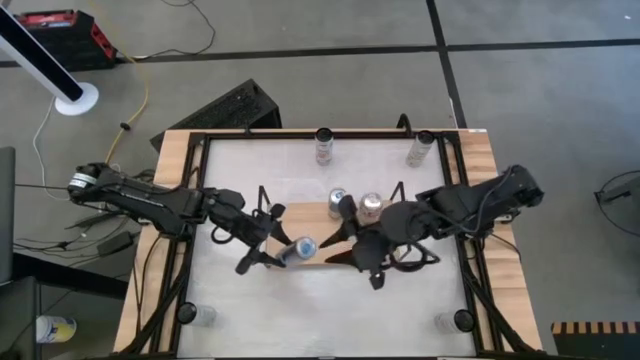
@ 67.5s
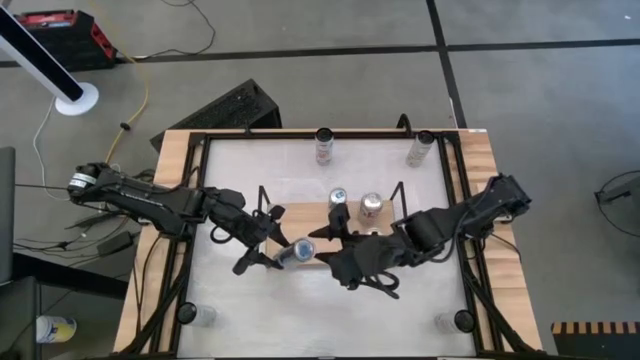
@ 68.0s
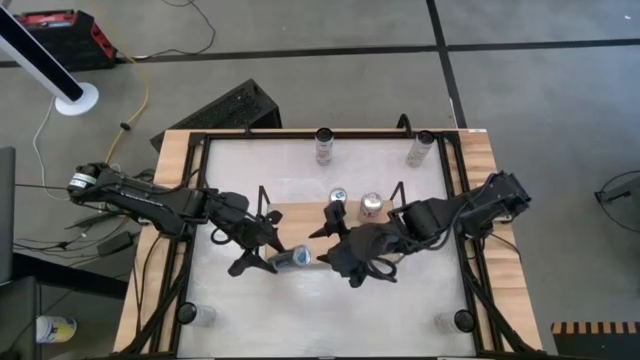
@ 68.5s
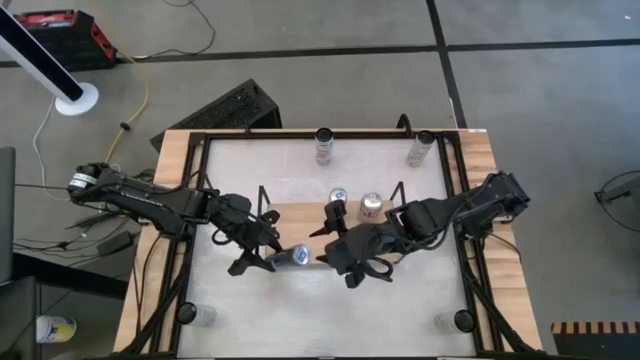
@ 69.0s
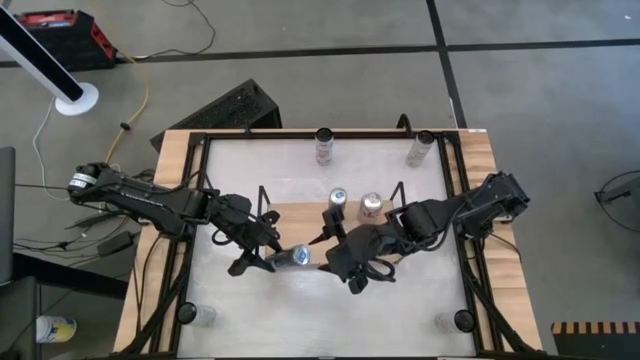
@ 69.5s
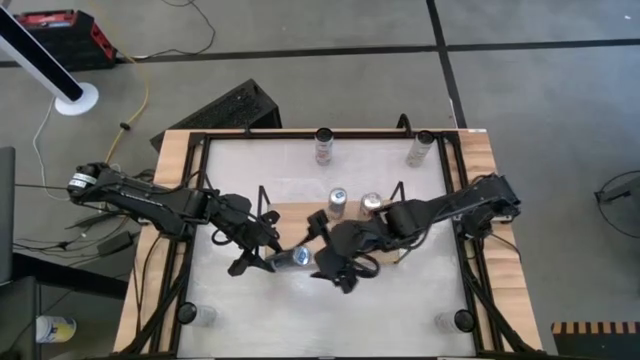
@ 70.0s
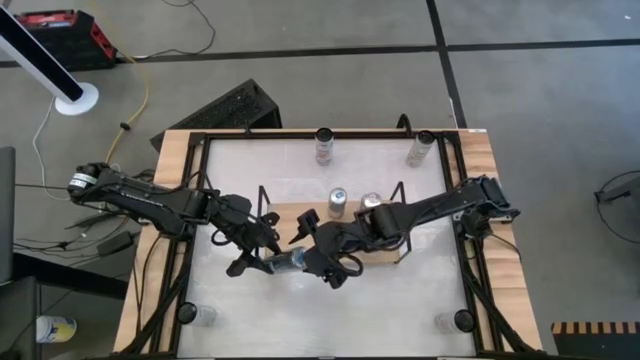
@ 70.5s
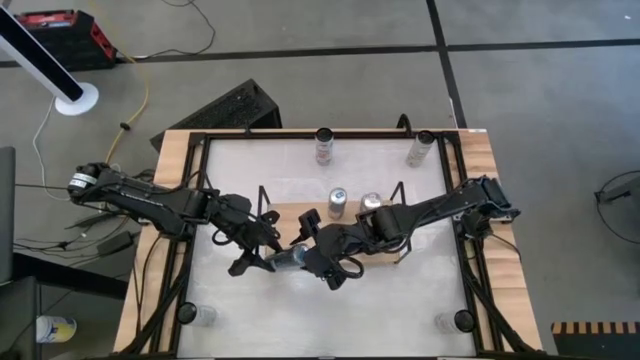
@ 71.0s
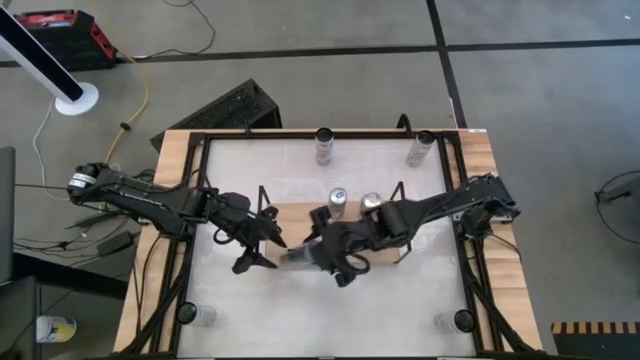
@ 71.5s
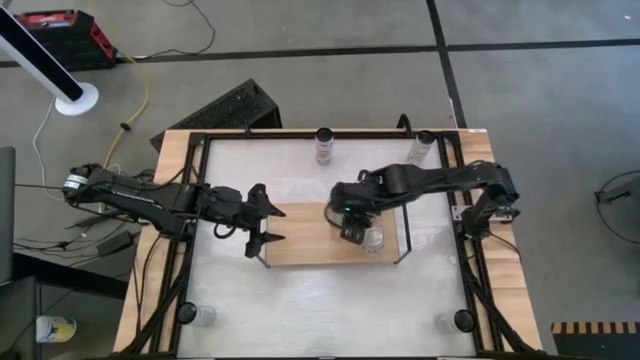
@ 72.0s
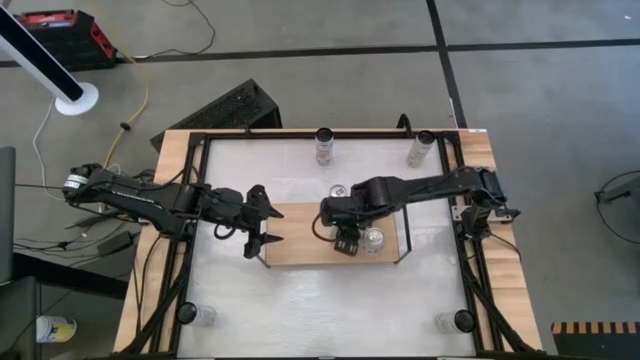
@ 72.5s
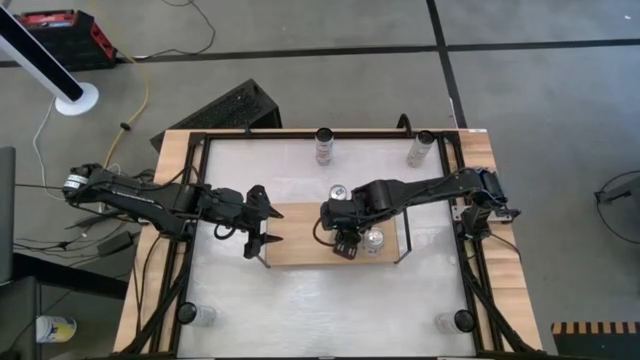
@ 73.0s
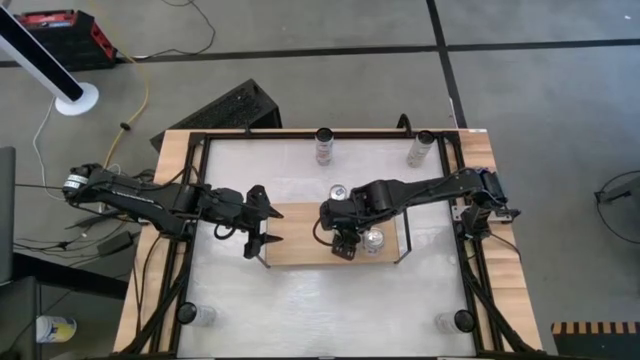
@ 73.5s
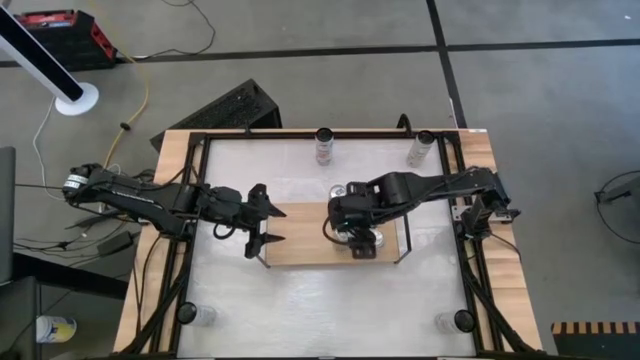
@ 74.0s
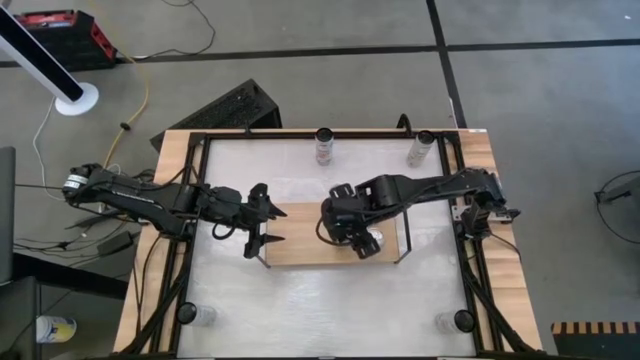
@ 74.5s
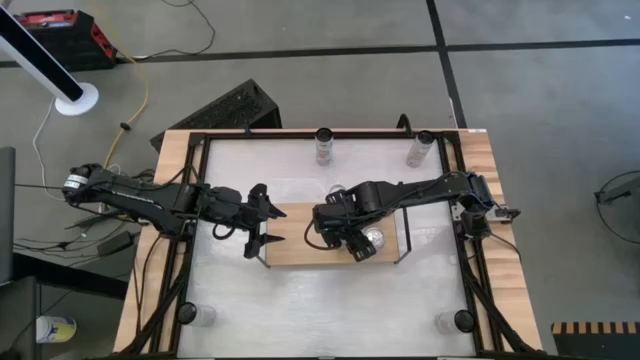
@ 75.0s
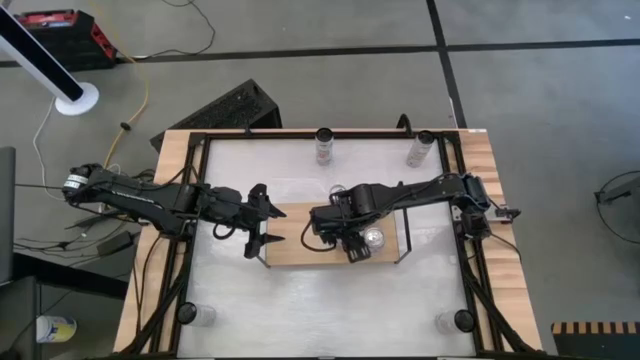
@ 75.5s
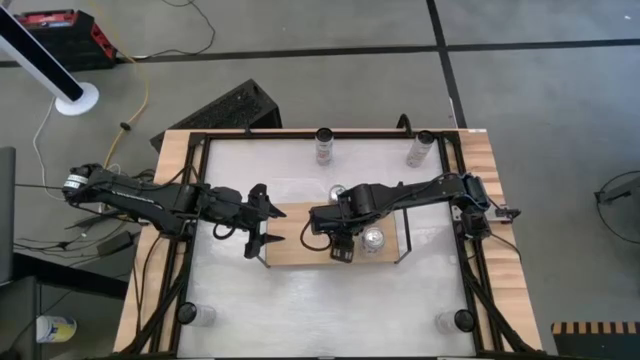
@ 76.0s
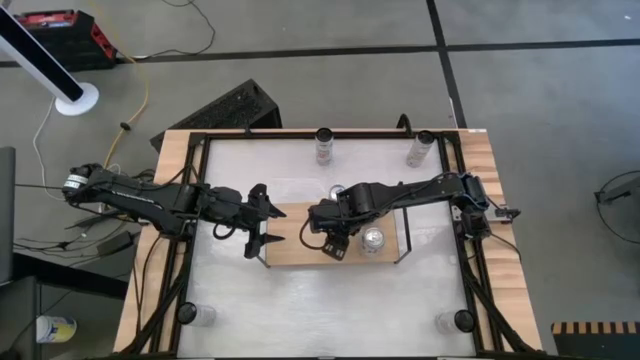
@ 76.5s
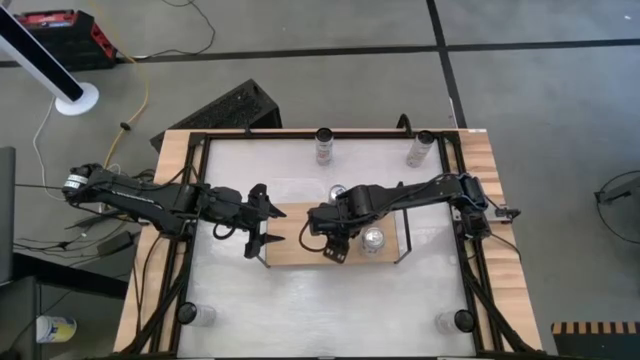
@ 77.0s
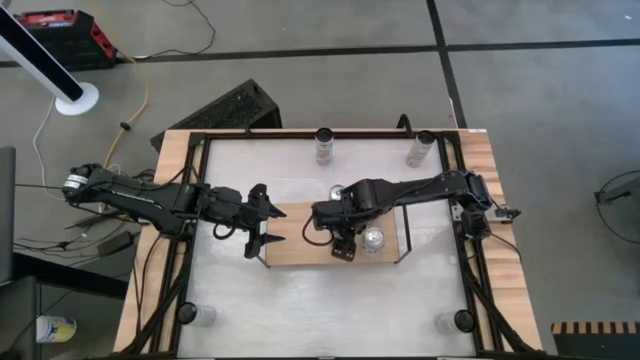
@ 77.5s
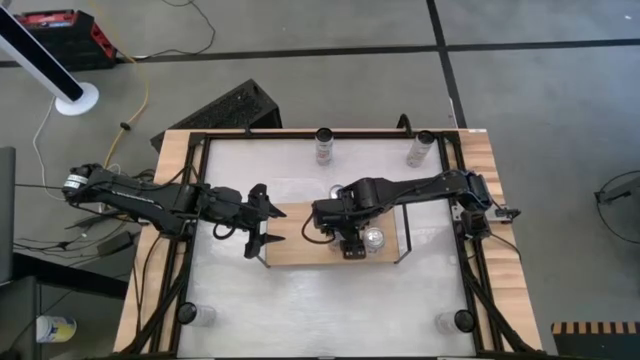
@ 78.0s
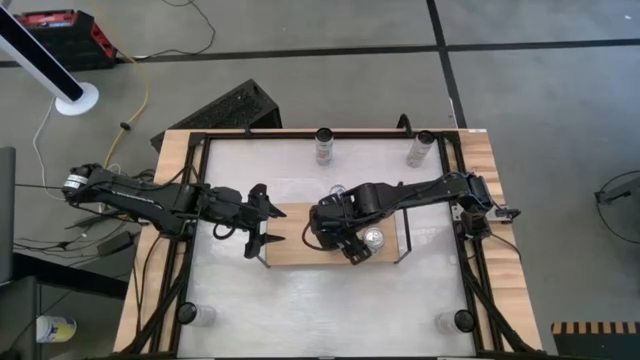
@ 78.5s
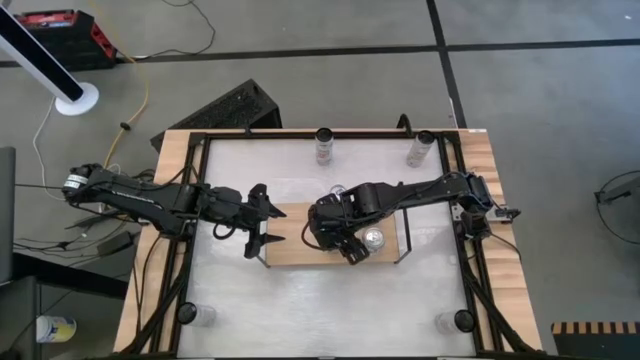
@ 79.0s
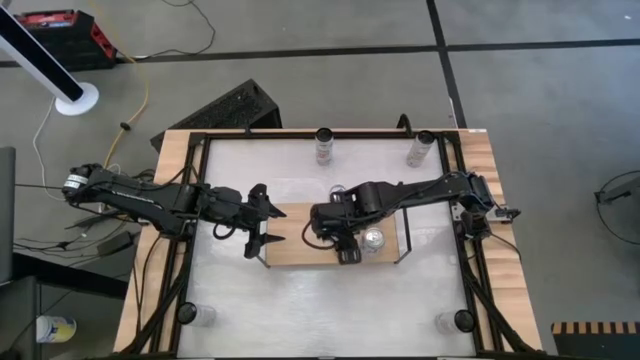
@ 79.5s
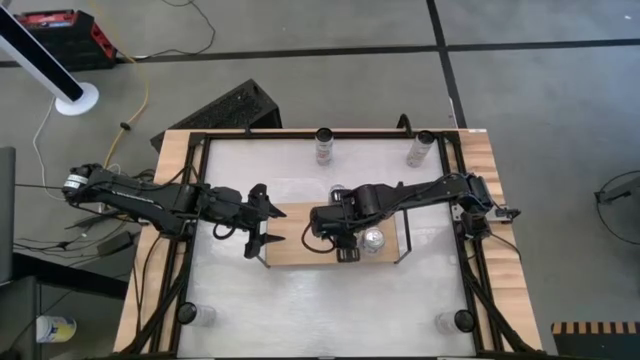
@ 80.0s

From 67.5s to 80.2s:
Task: Place canned beverage on shelf
Put the blue soda can on the shelf aligned with the other blue soda can

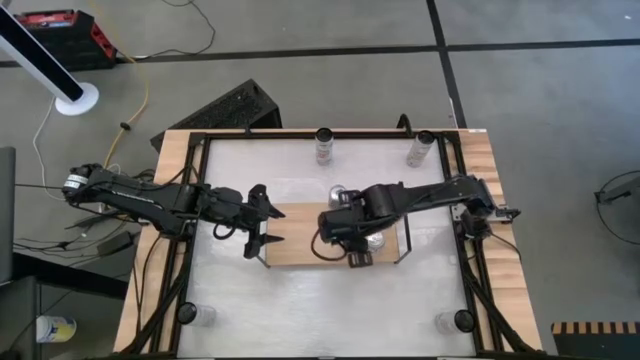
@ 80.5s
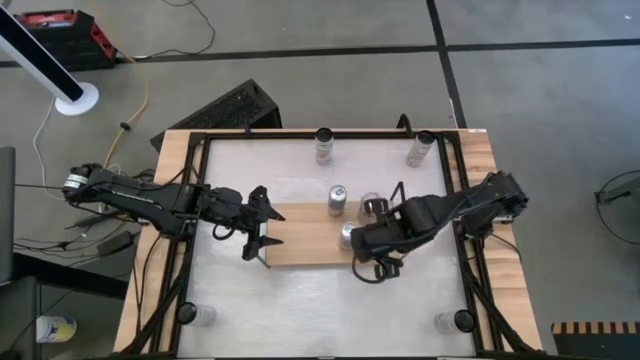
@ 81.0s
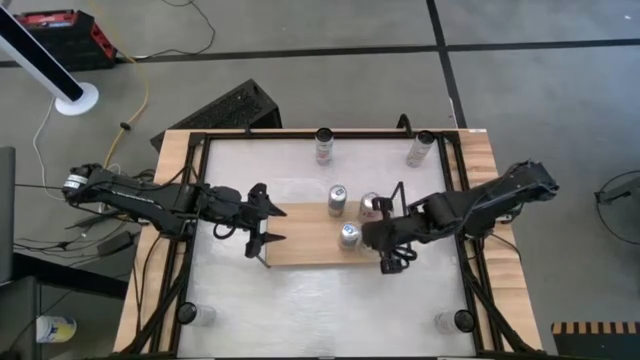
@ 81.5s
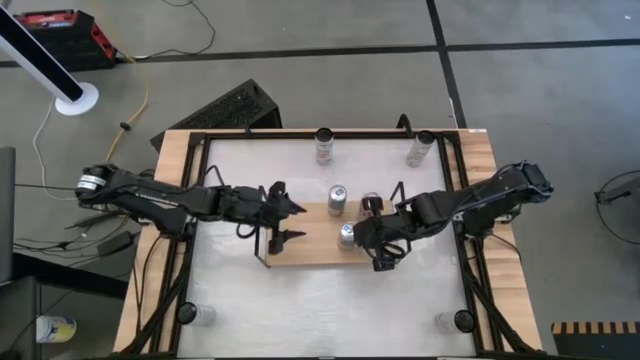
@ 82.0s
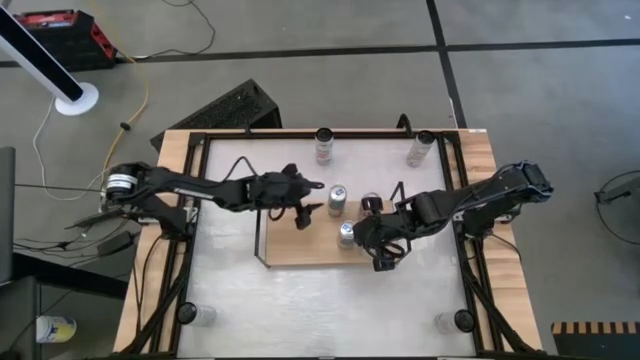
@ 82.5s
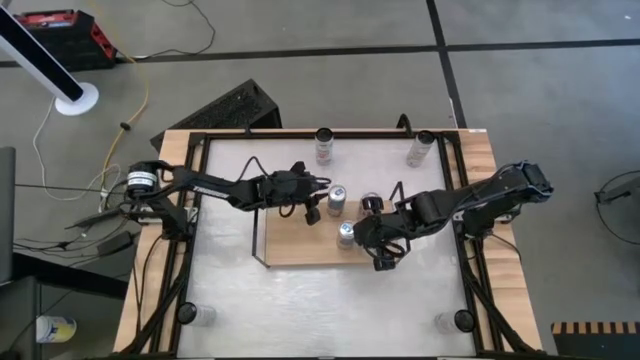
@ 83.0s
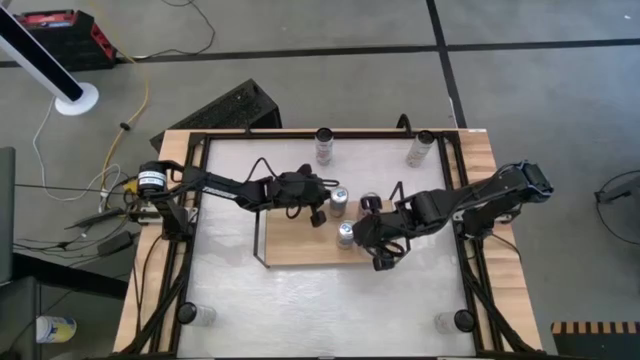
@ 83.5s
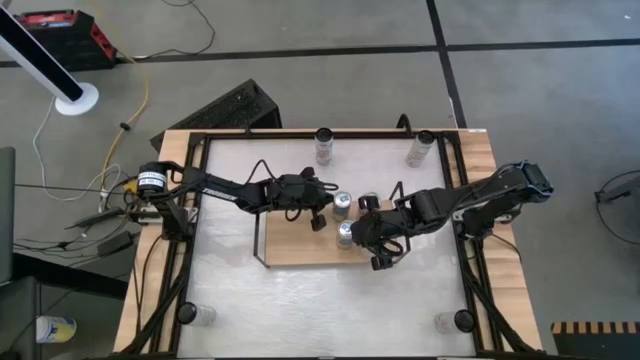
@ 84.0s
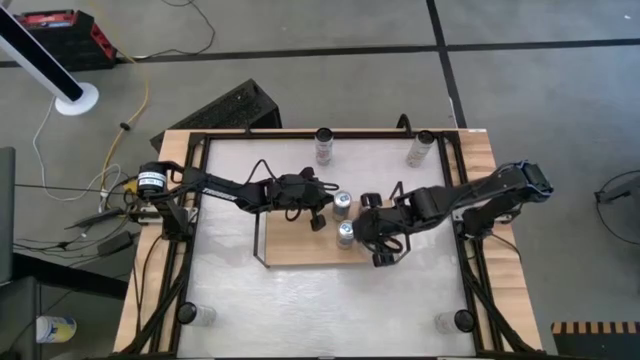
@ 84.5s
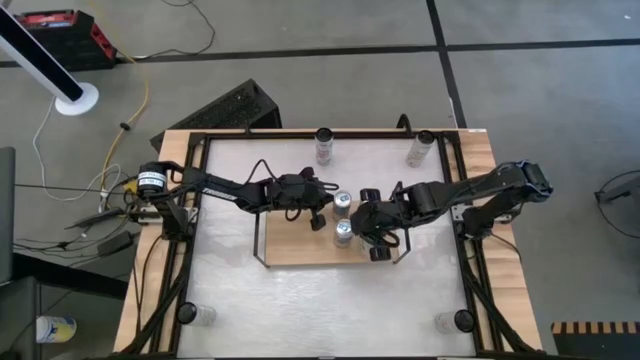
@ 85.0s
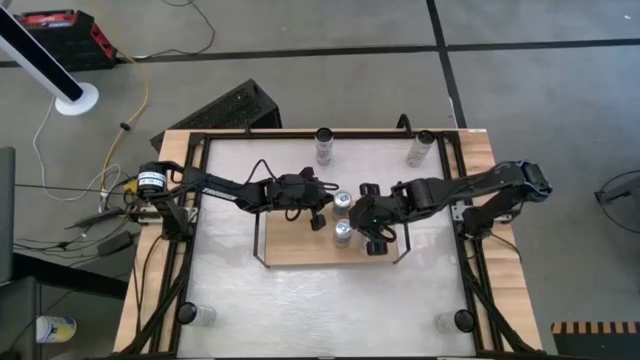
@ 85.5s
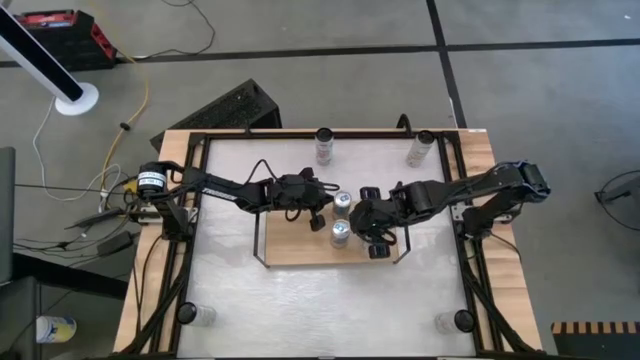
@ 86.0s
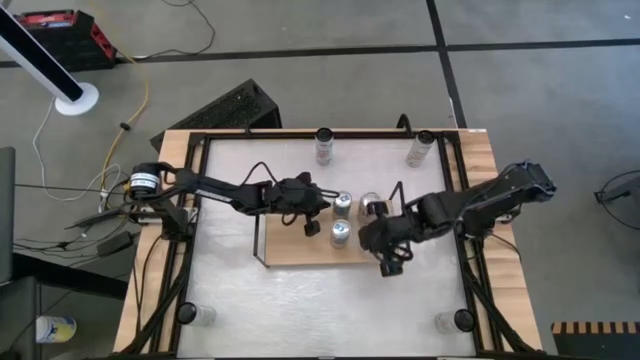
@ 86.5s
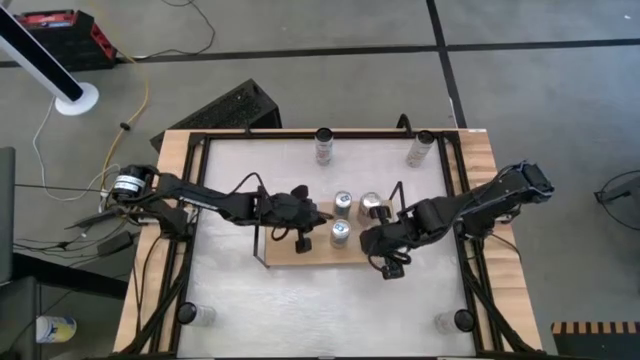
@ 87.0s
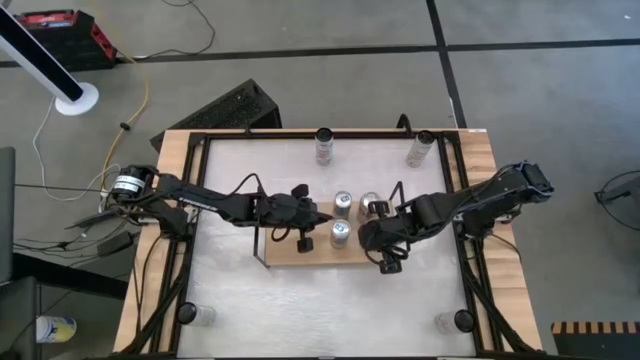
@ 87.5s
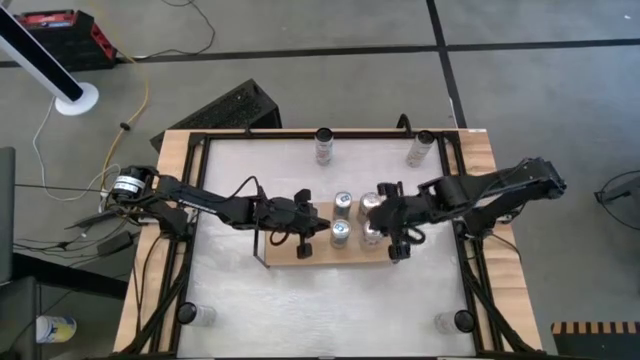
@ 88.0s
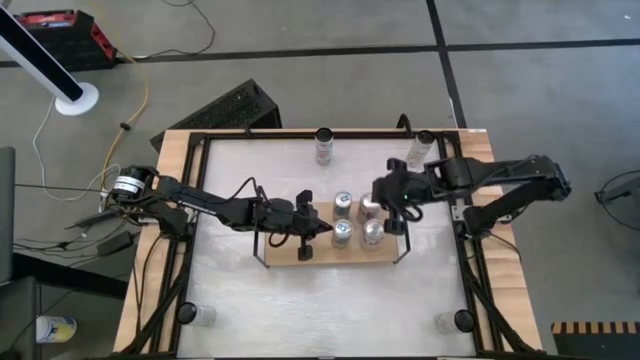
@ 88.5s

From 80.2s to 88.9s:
Adjust the blue soda cans

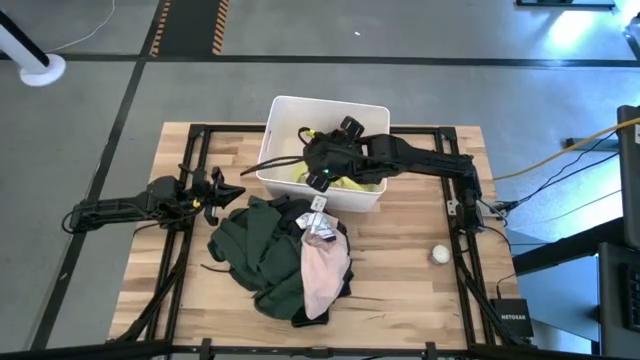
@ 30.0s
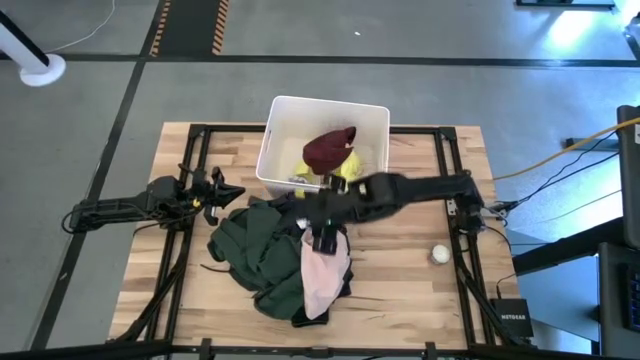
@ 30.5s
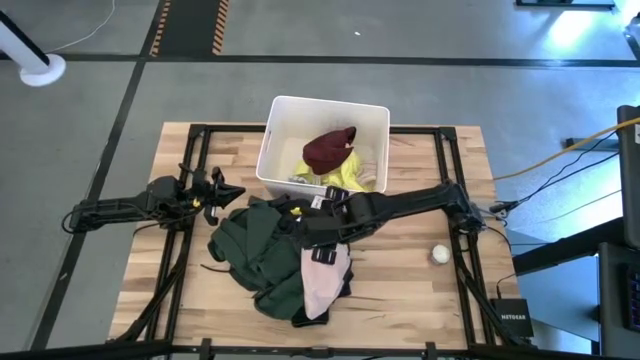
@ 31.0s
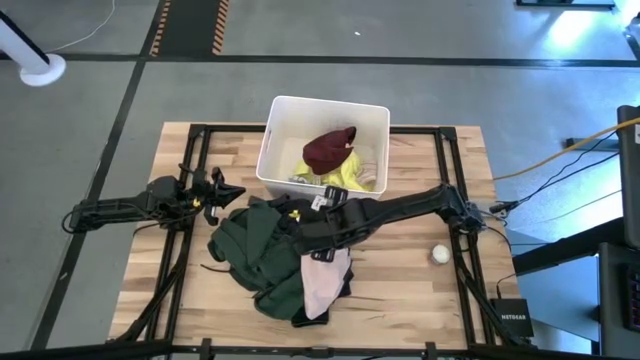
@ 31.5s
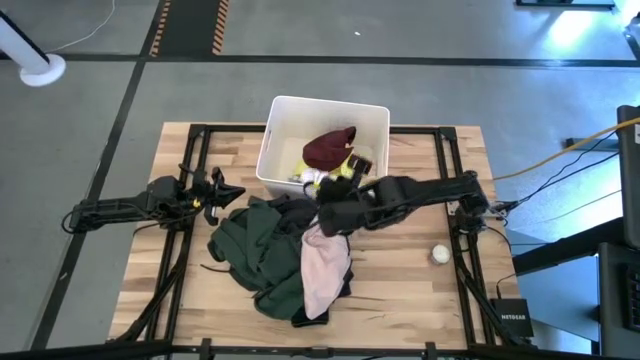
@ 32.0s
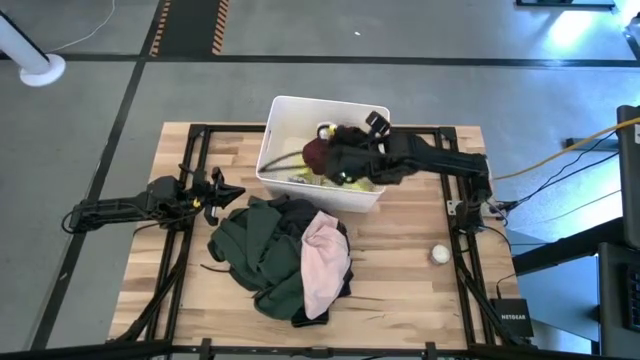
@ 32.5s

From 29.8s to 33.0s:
Task: Sort clothes
Put the white stripe sock into the white bin
